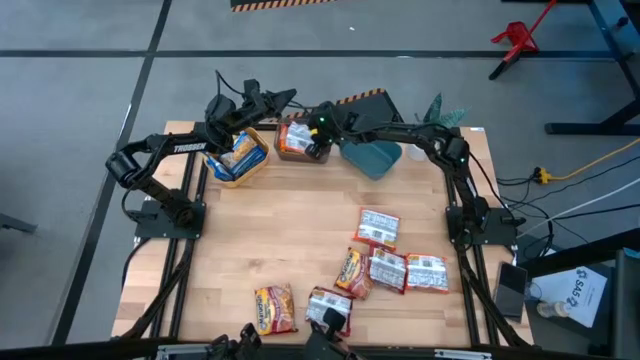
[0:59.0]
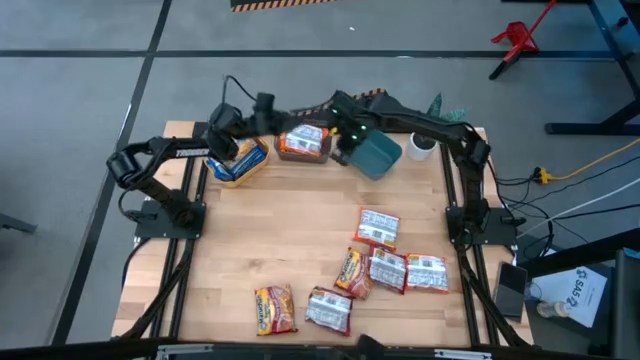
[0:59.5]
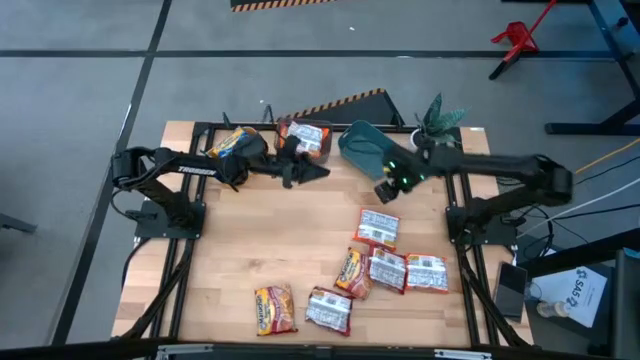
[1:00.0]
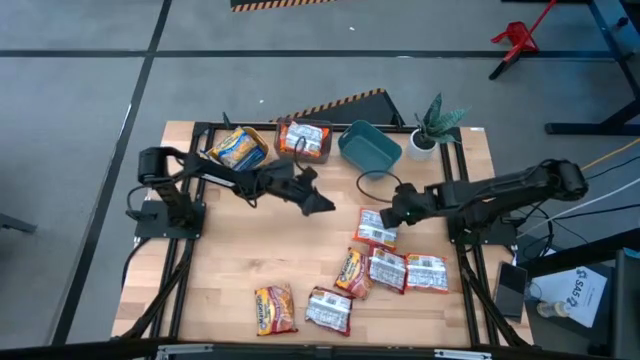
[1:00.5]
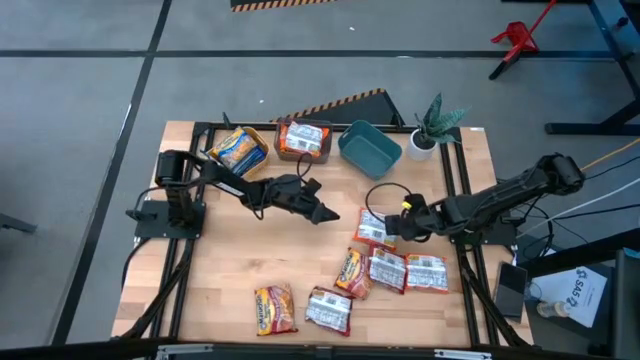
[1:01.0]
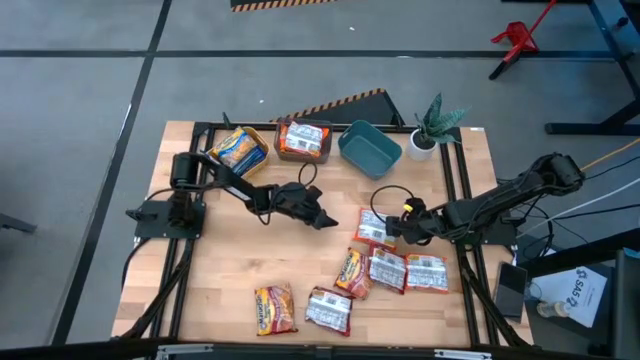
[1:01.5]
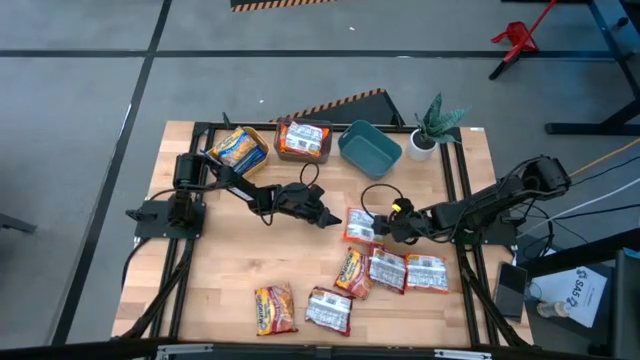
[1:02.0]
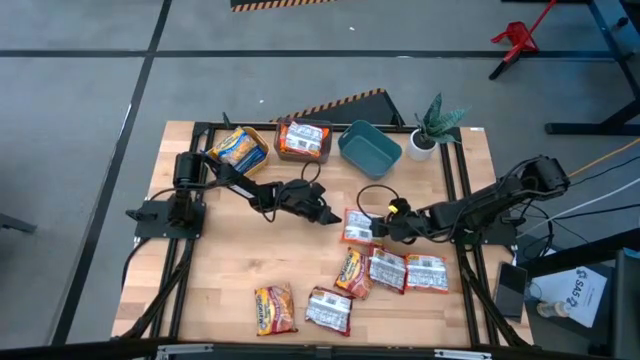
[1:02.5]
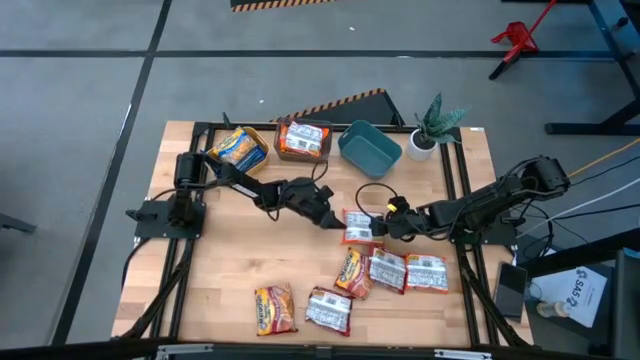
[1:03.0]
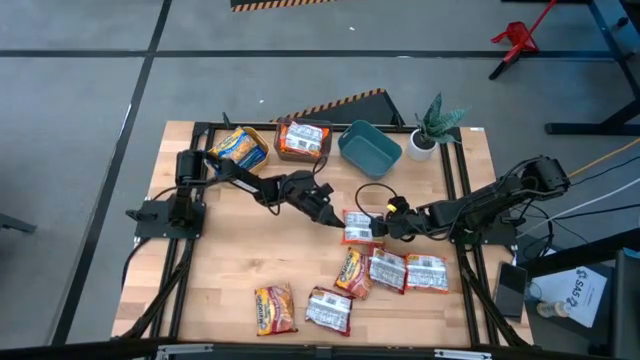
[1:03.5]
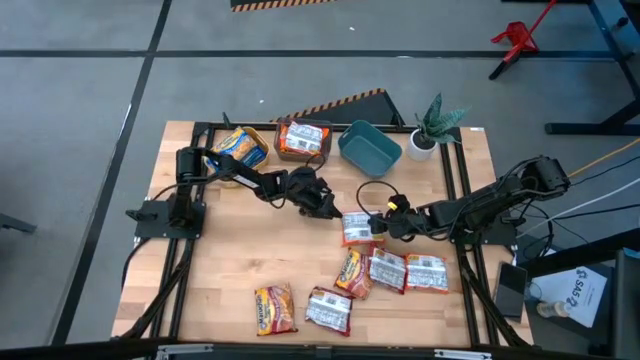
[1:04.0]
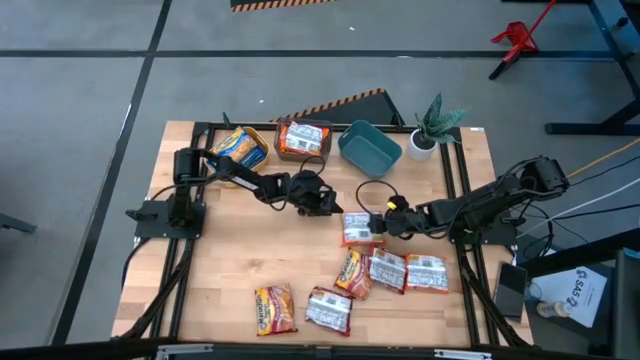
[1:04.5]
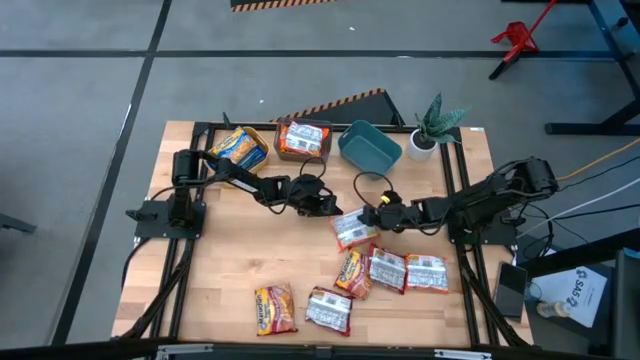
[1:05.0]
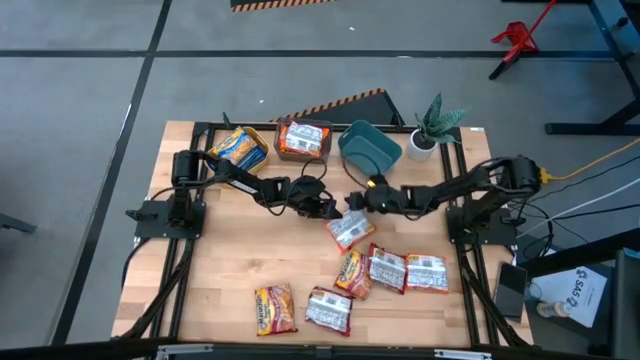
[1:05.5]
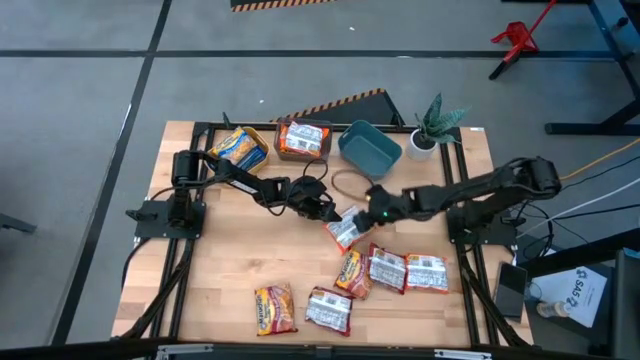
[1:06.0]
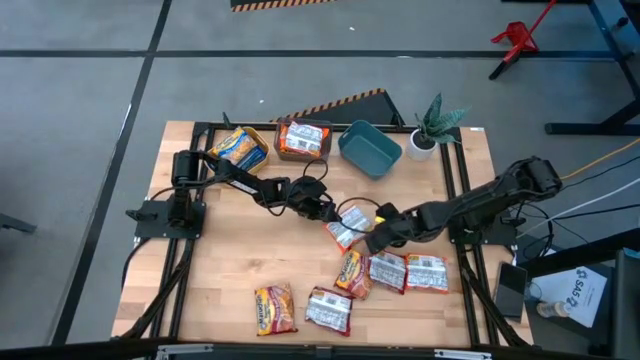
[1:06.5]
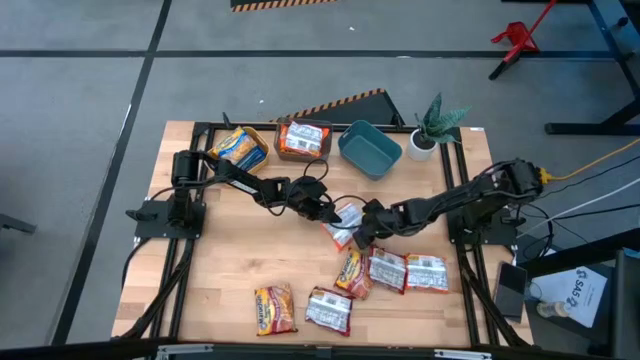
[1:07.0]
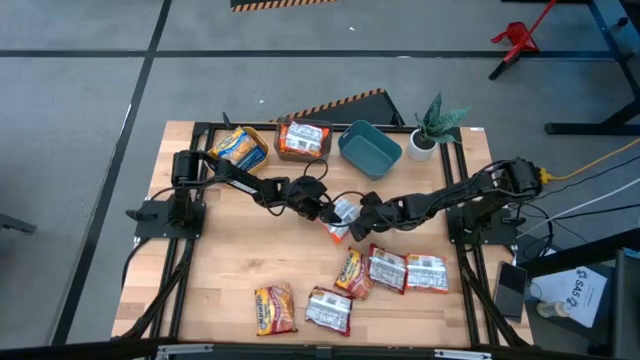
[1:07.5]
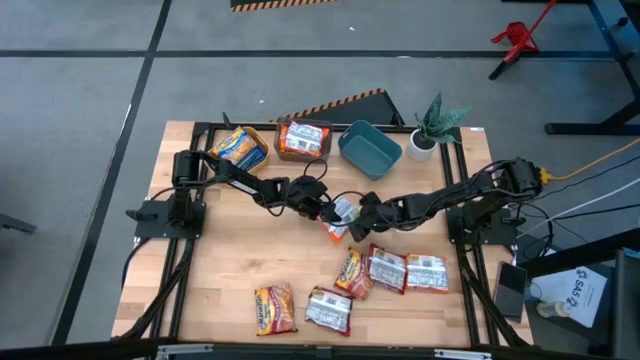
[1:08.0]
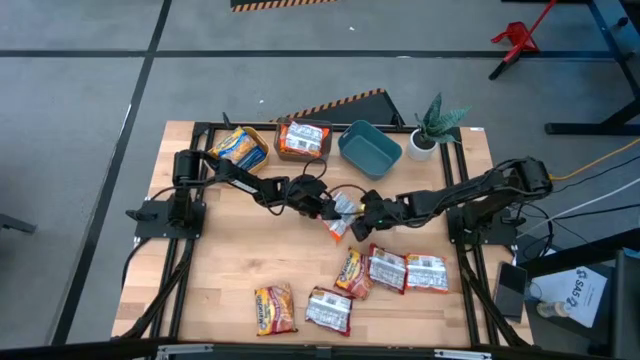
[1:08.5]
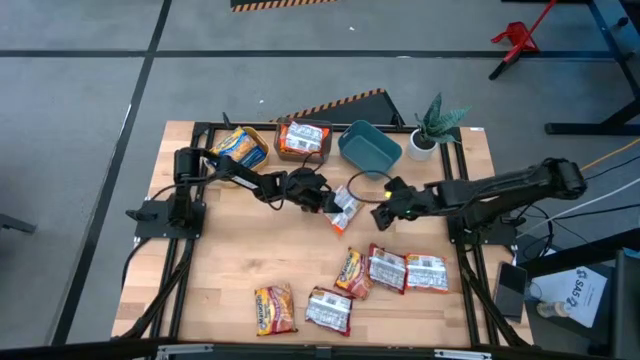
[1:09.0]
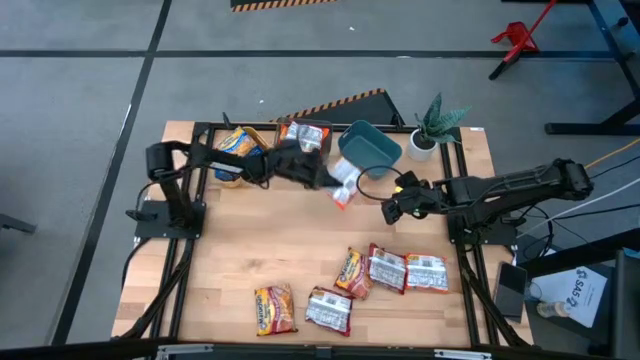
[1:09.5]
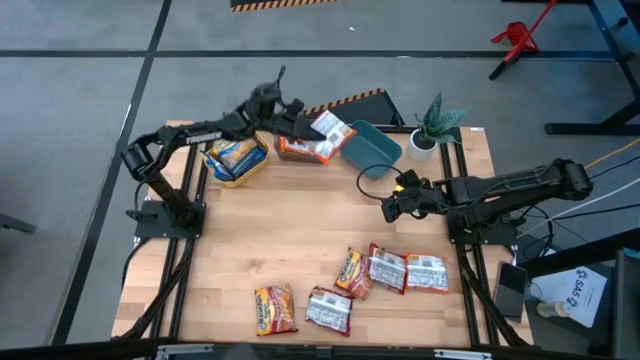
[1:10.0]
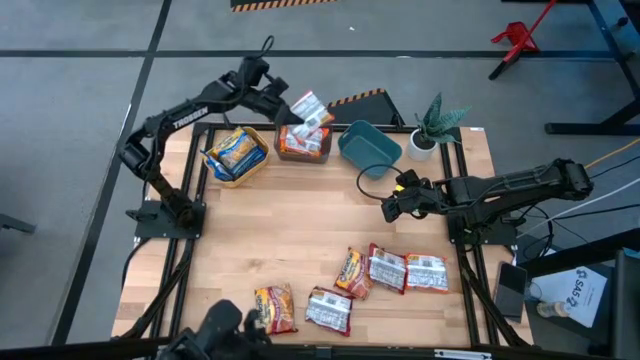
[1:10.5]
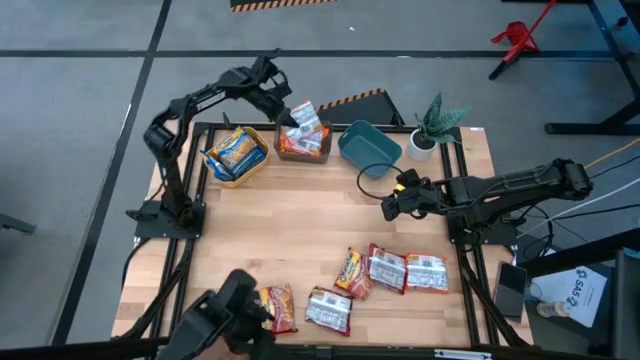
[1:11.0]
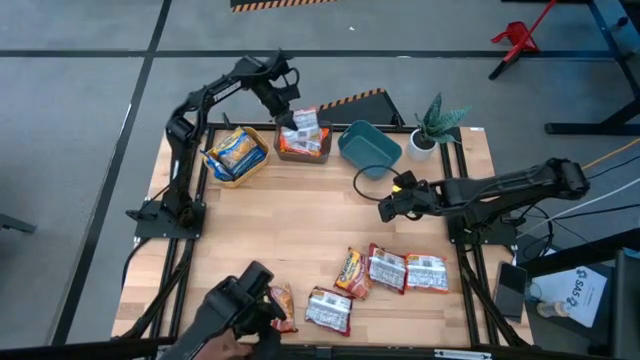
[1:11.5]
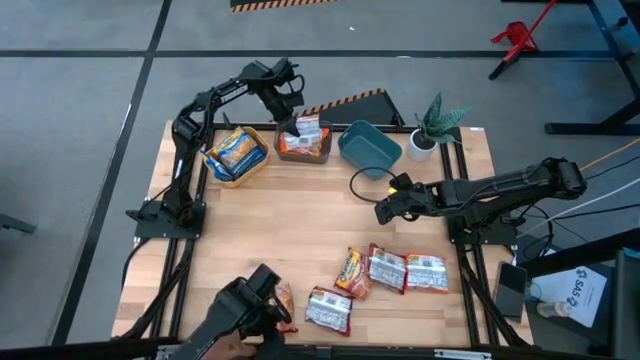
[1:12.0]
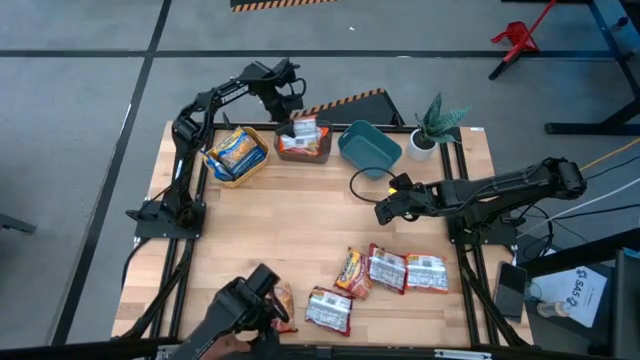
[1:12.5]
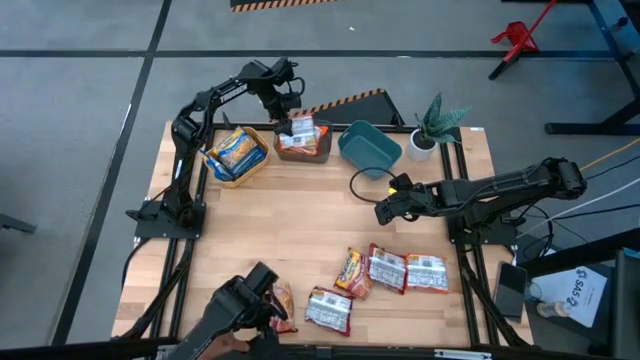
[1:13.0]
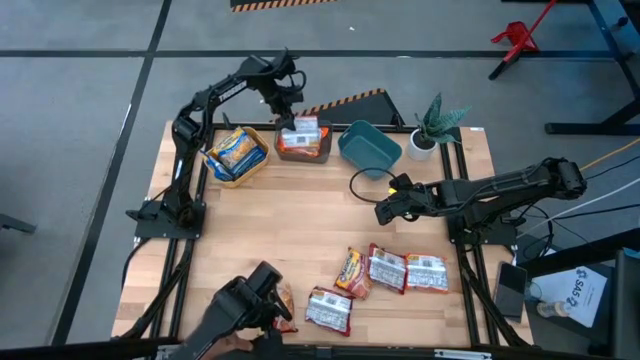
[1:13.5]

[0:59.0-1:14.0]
Task: Sort Maruchan noodles
Put the orange noodle pack into the black bin

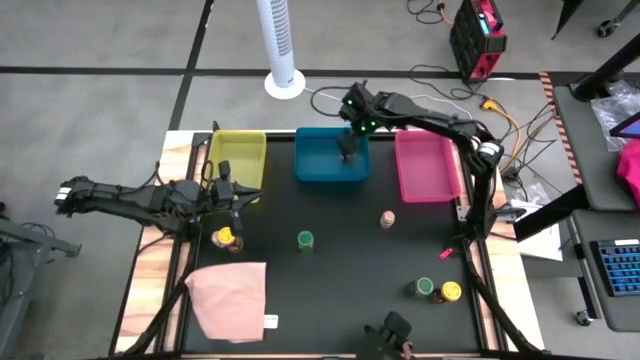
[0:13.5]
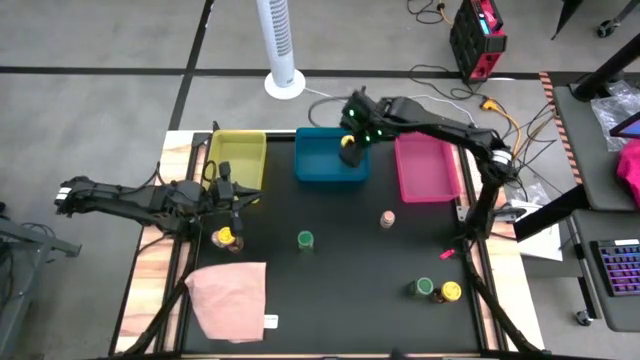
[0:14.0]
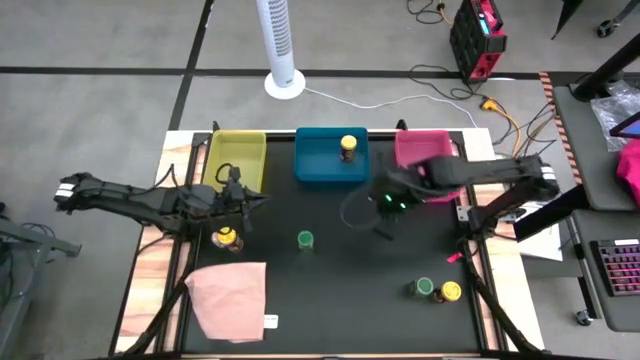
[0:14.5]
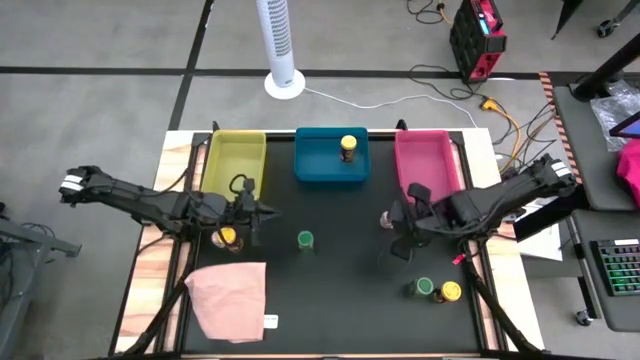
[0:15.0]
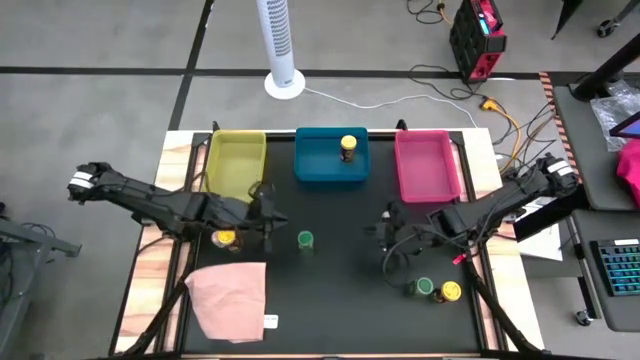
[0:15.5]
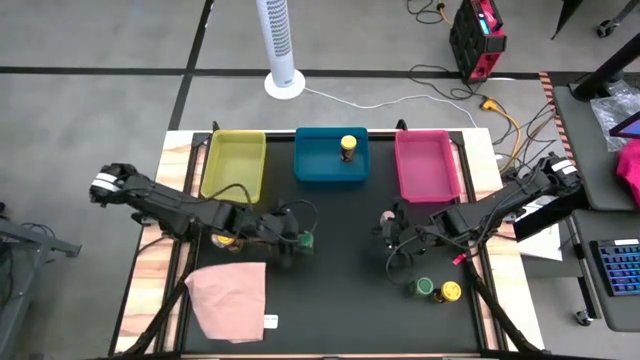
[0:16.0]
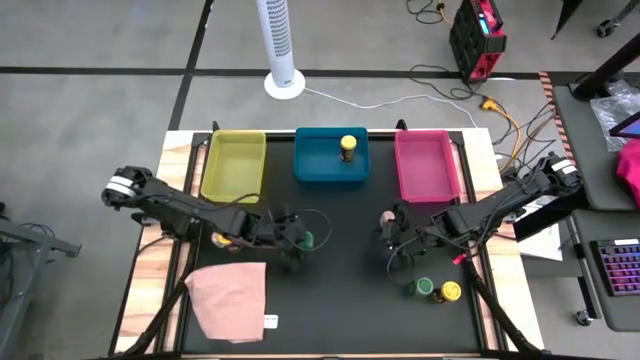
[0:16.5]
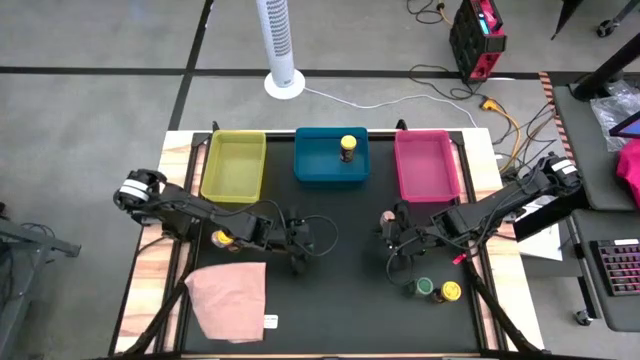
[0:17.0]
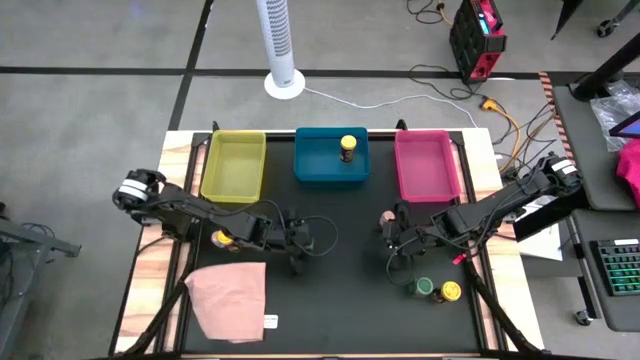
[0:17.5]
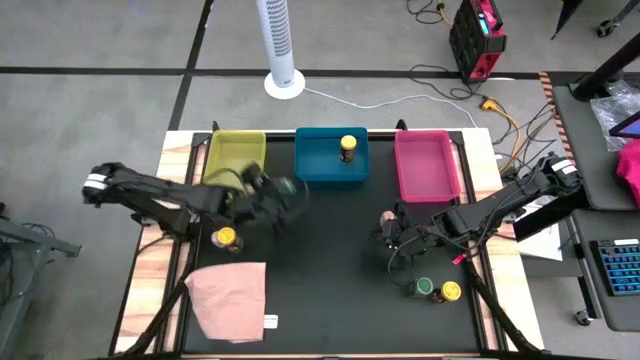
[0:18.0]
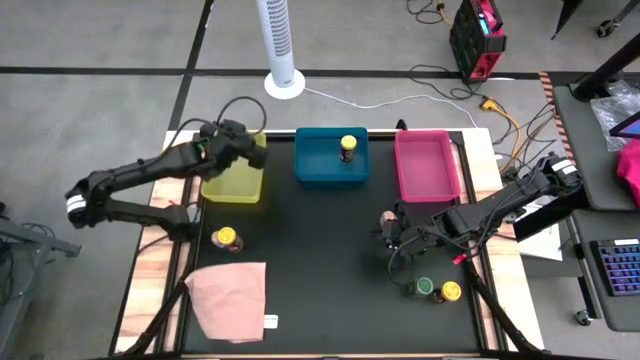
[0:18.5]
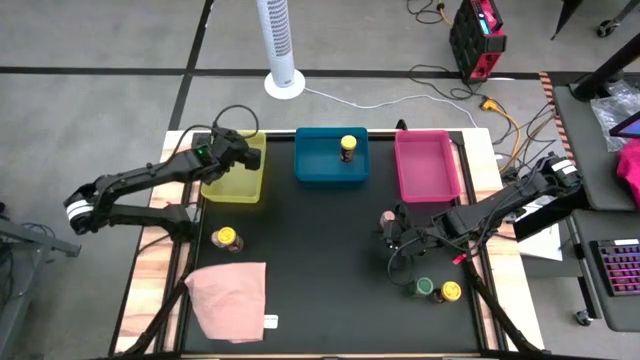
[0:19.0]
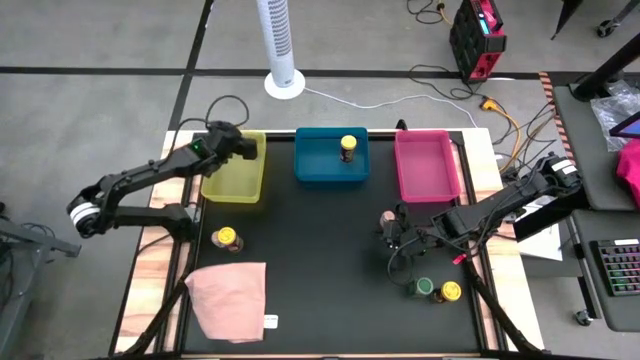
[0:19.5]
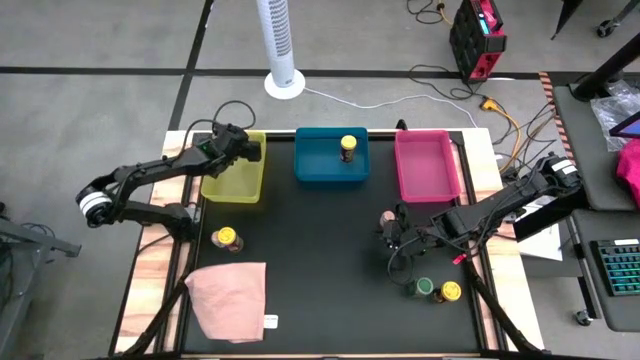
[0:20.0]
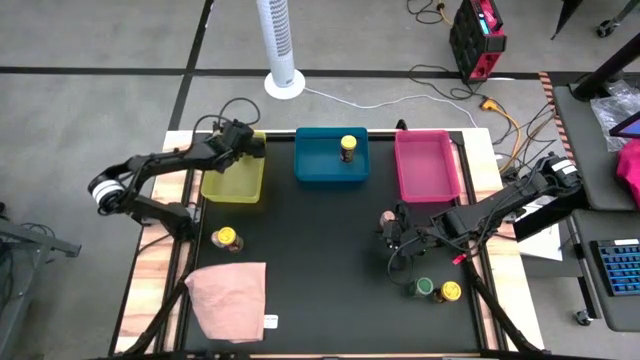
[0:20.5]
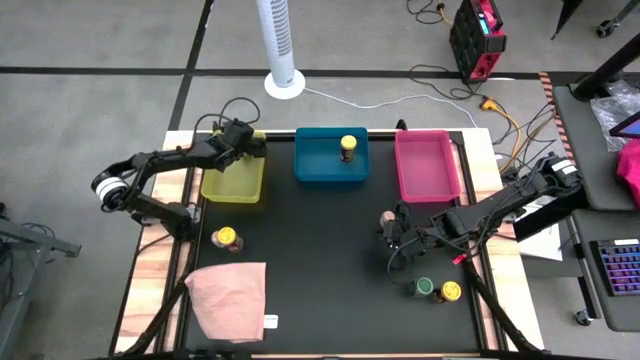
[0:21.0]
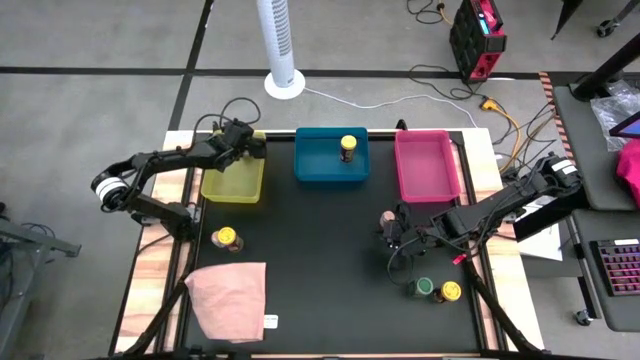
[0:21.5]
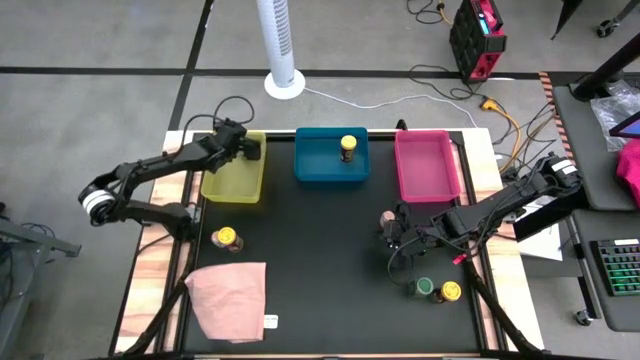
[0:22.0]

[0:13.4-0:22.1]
Task: Sort spices by type
Put the left green seasoning bottle into the yellow bin
